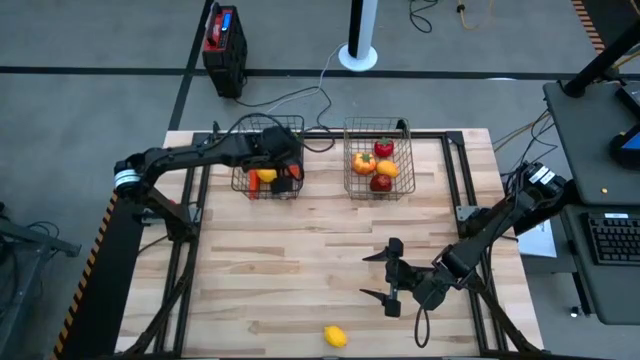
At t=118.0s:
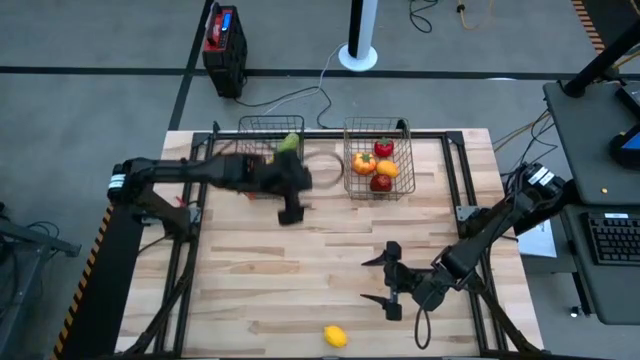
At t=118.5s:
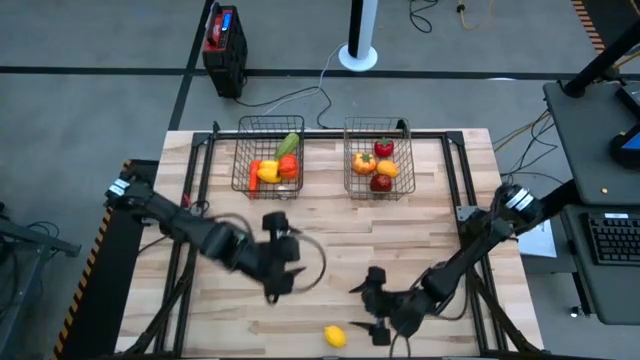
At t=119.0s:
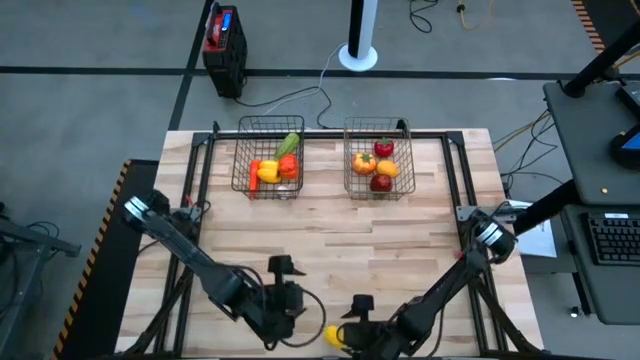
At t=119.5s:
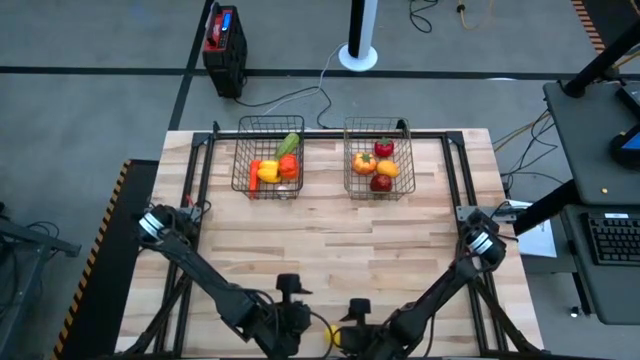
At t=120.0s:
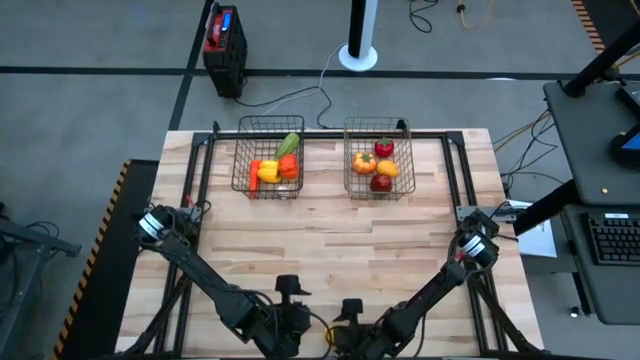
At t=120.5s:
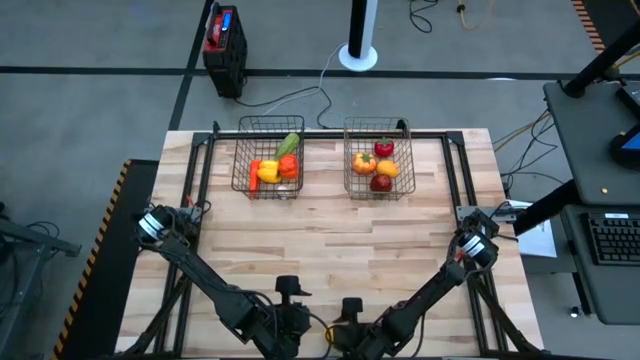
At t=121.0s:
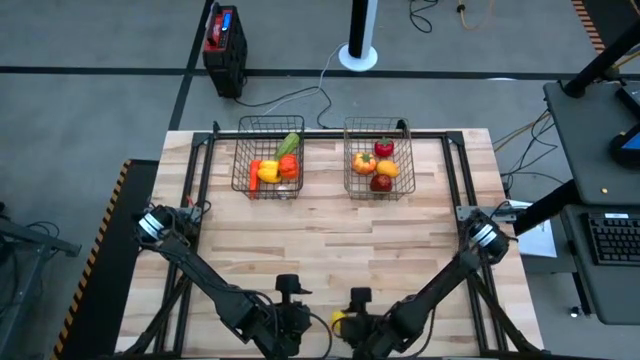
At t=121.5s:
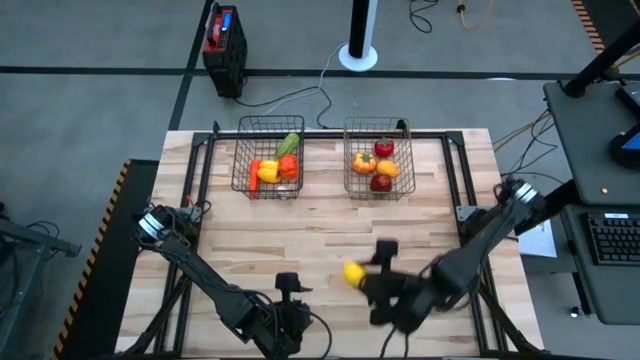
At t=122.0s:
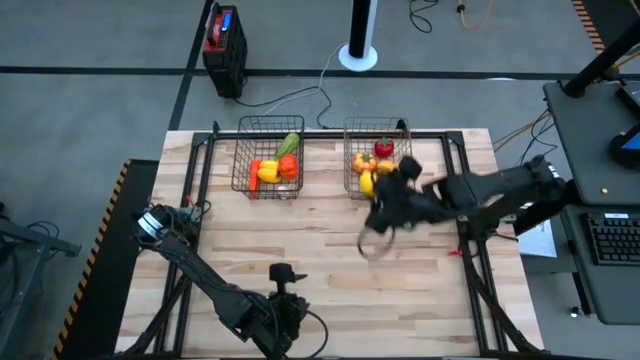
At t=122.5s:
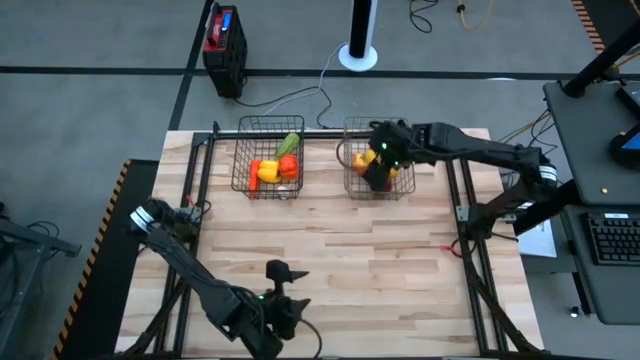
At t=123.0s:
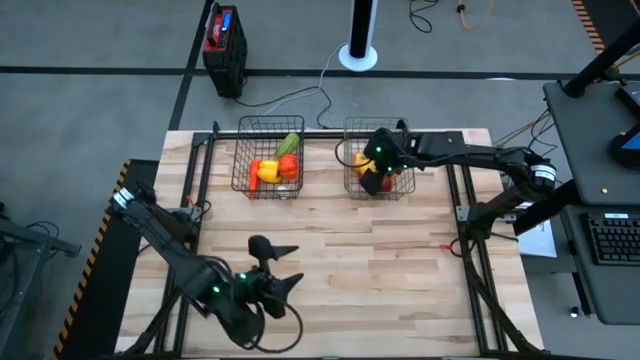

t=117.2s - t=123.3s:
Task: Sort produce into baskets
Put the orange lemon into the gold wire basket

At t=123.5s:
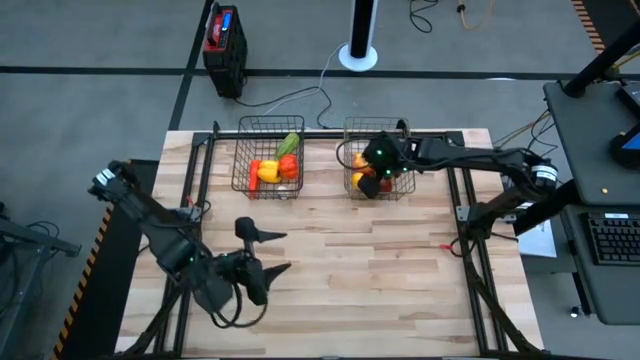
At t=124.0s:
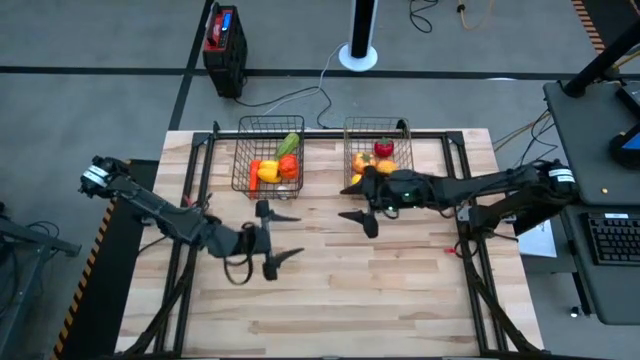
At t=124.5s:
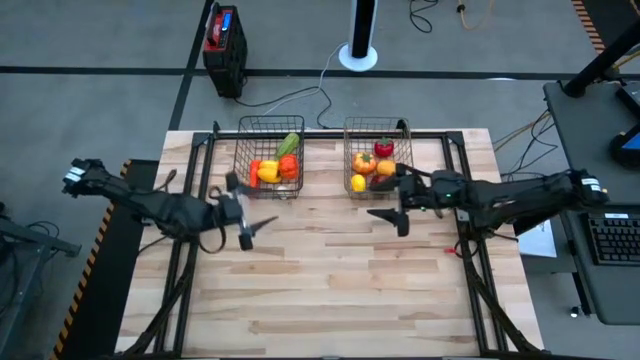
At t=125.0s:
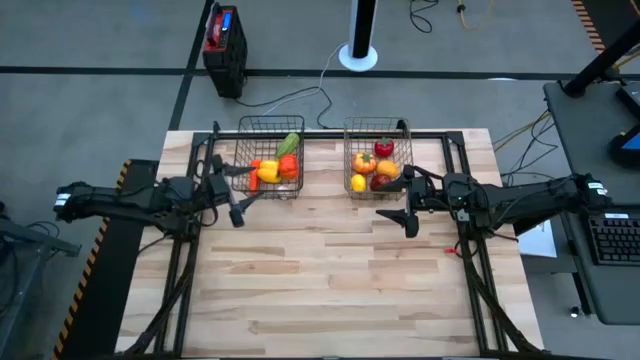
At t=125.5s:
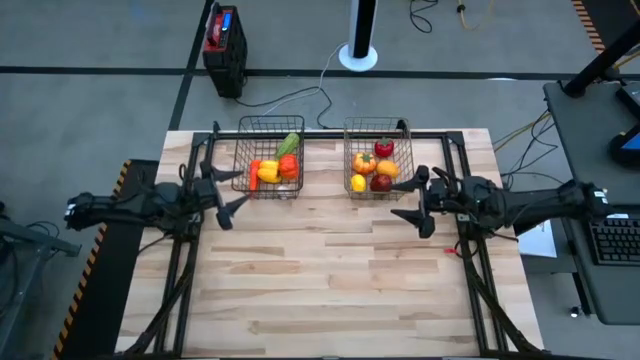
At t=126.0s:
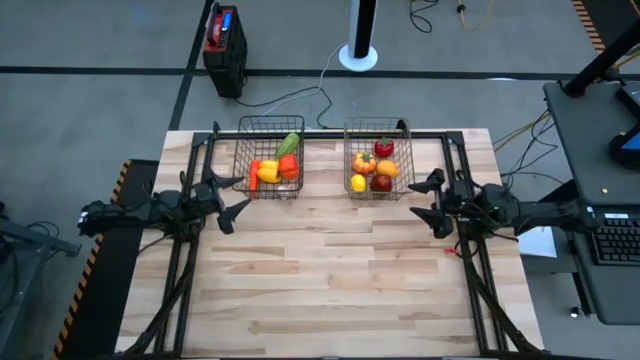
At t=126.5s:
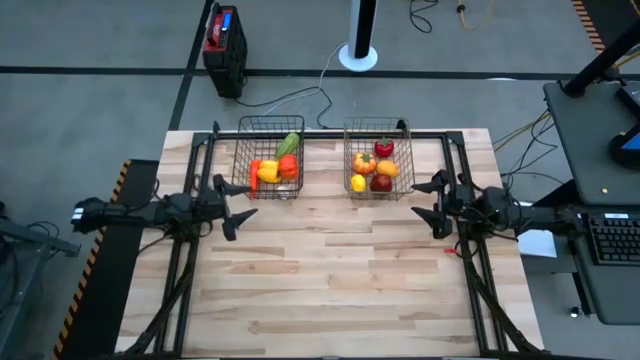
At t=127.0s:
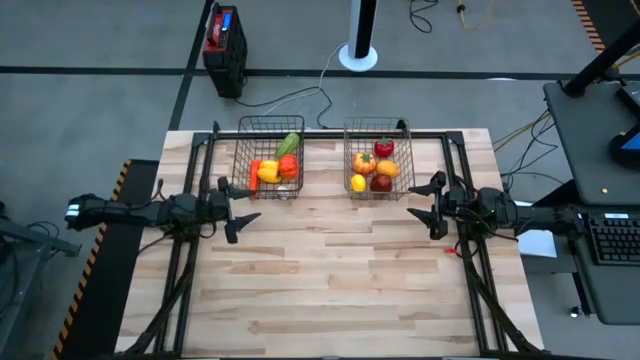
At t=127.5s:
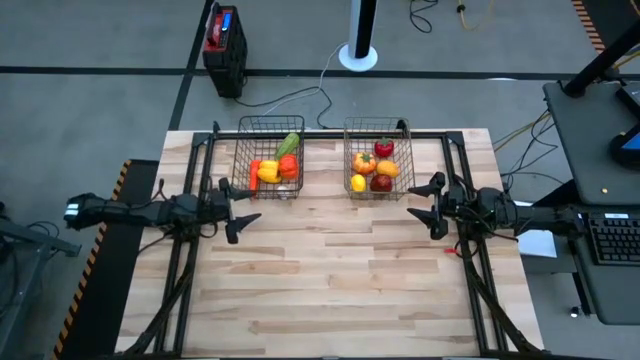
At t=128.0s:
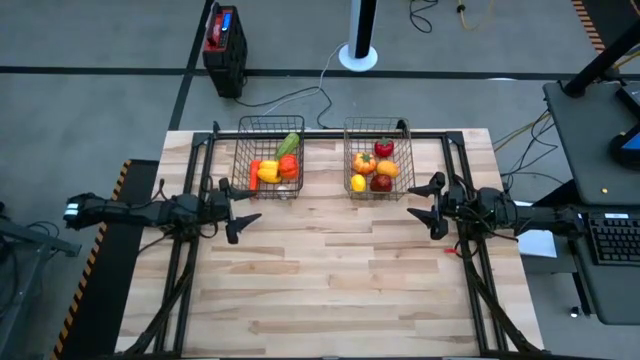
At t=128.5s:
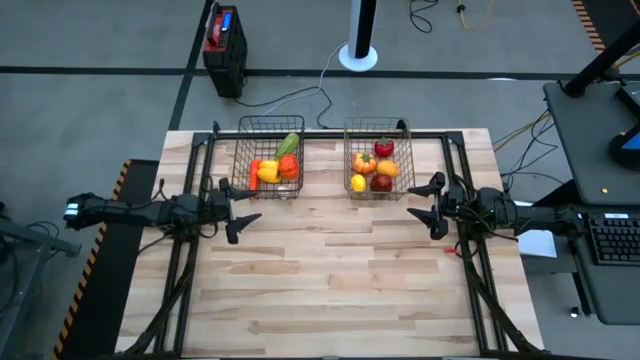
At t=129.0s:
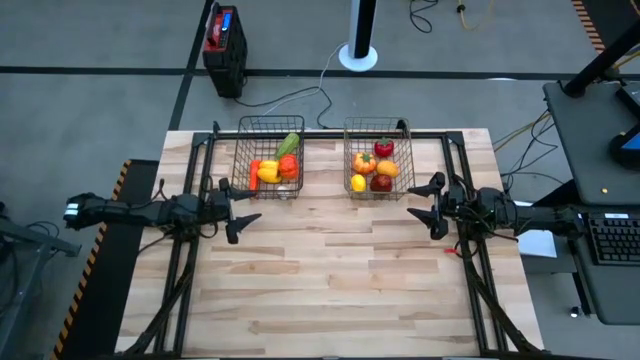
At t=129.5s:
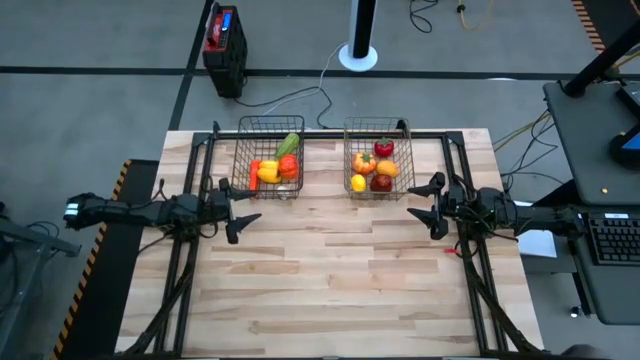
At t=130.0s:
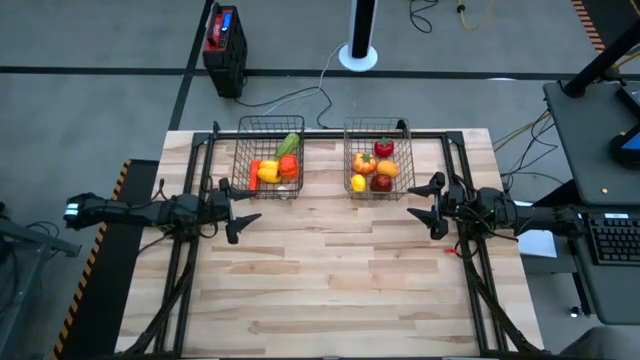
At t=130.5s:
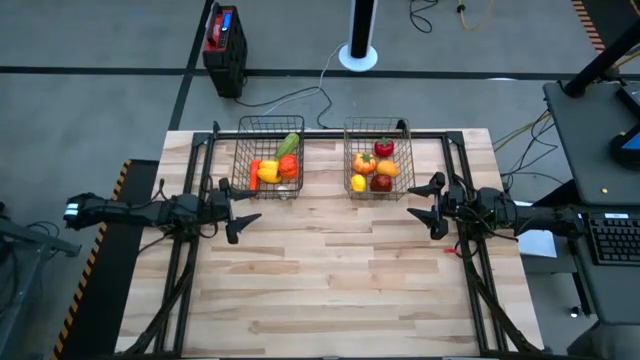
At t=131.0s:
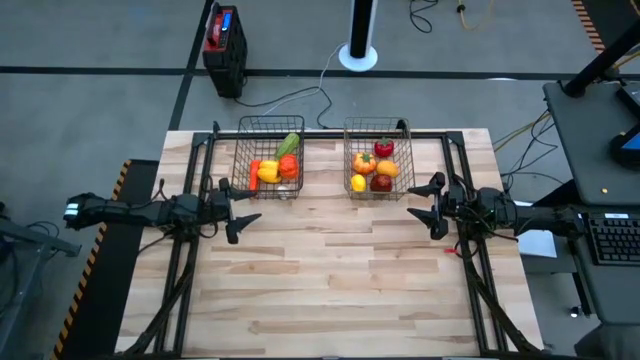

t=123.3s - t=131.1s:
Return to Home Position

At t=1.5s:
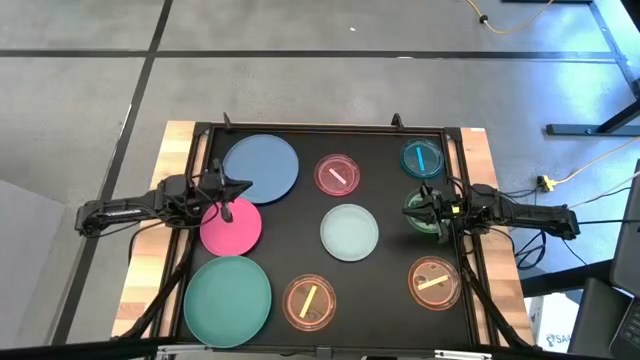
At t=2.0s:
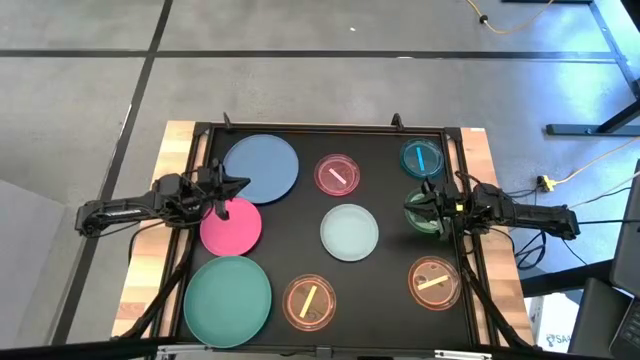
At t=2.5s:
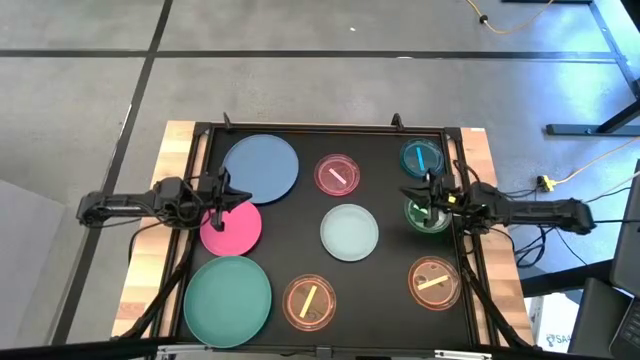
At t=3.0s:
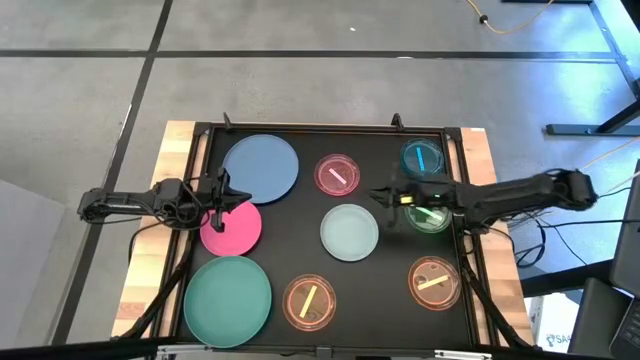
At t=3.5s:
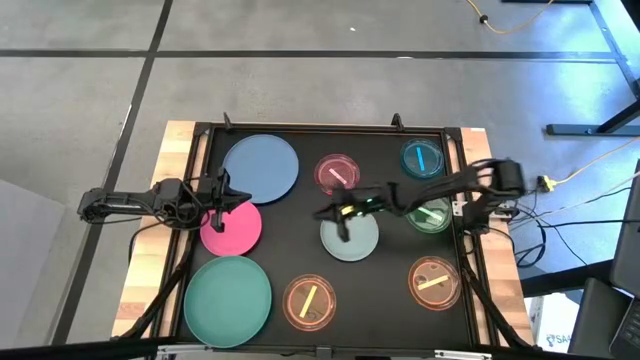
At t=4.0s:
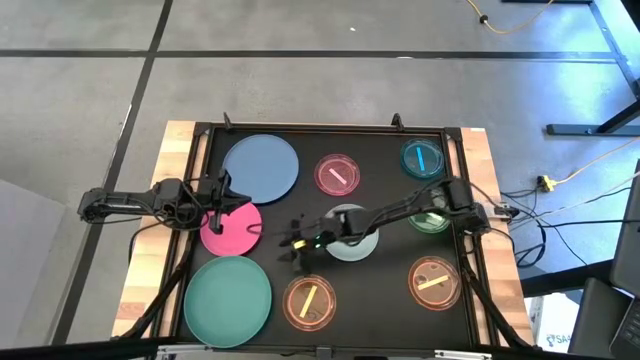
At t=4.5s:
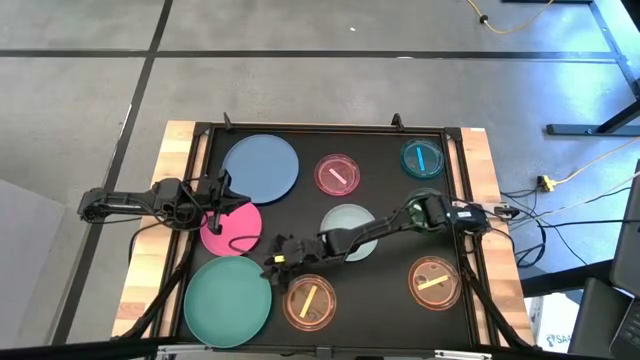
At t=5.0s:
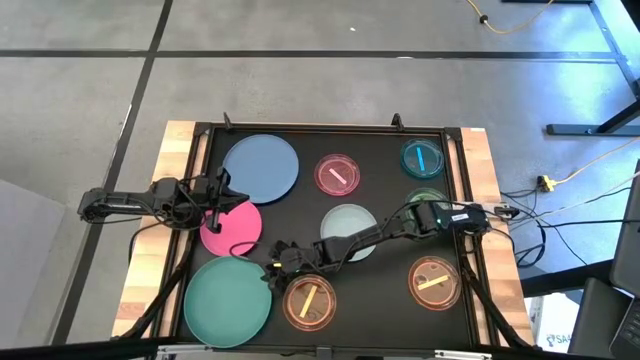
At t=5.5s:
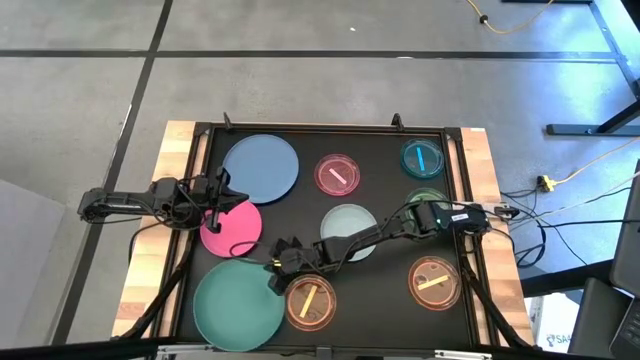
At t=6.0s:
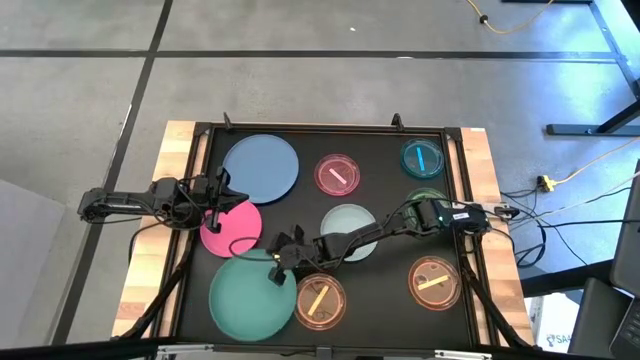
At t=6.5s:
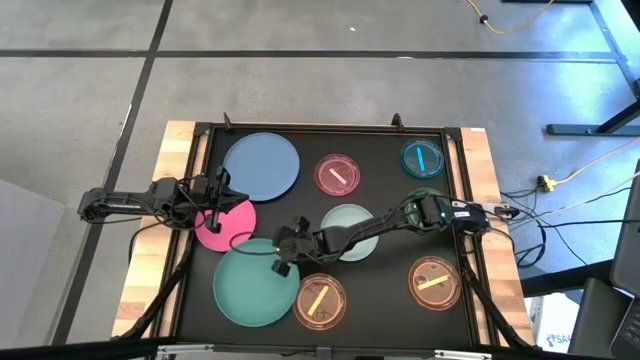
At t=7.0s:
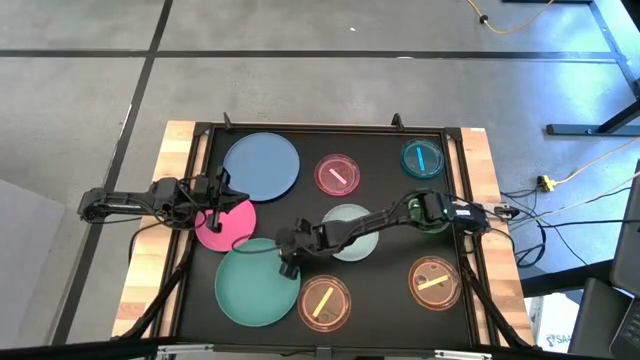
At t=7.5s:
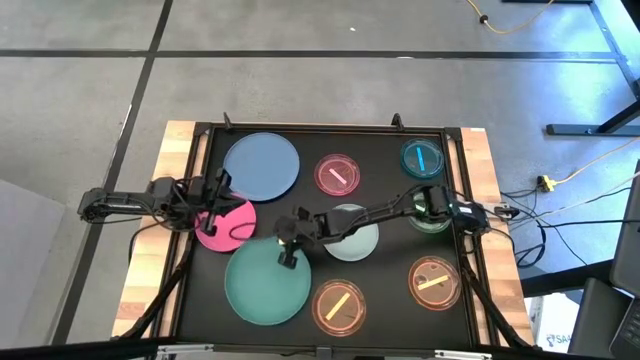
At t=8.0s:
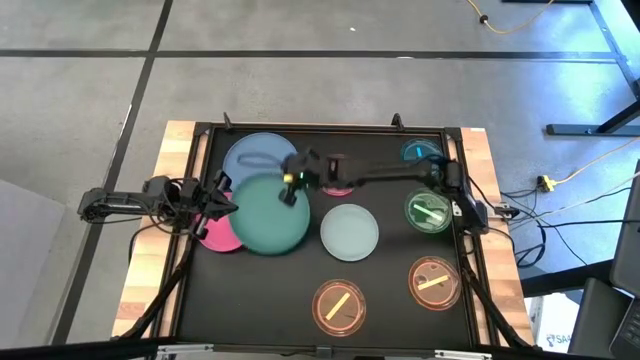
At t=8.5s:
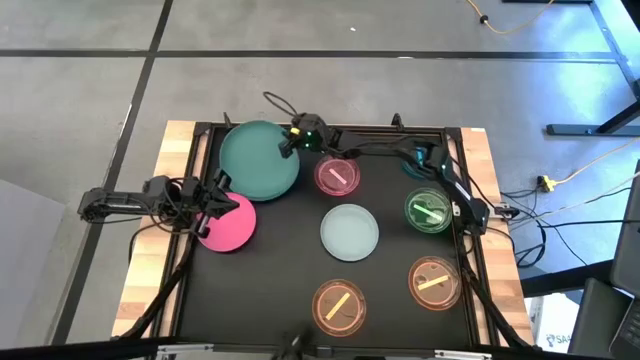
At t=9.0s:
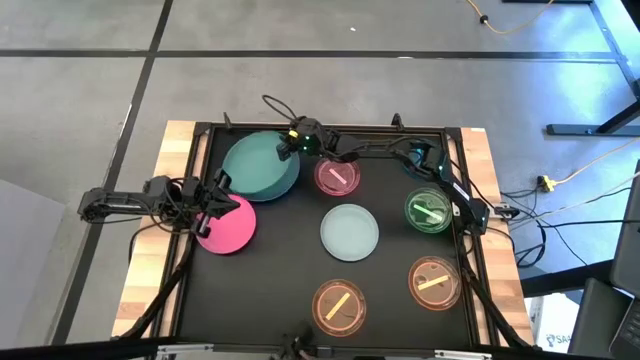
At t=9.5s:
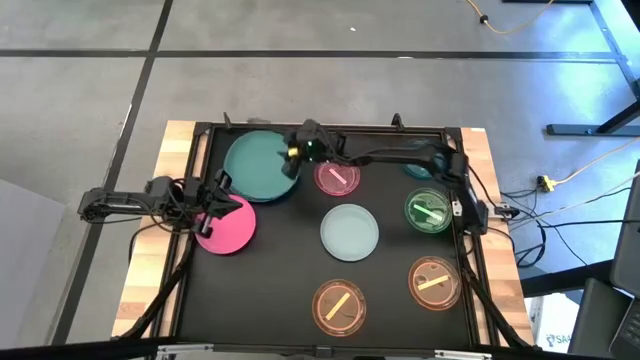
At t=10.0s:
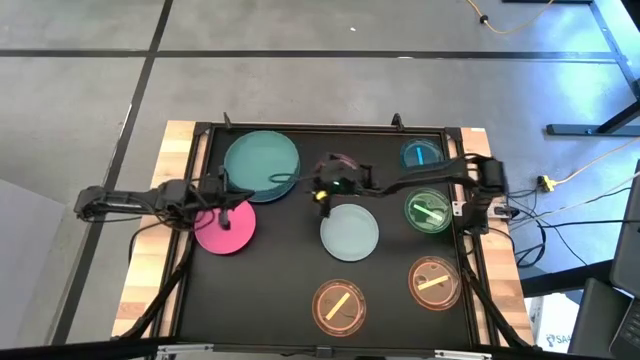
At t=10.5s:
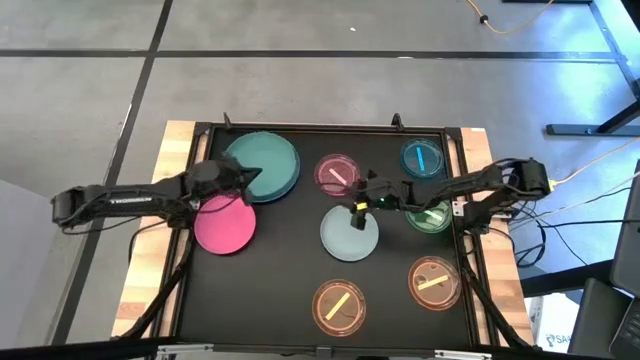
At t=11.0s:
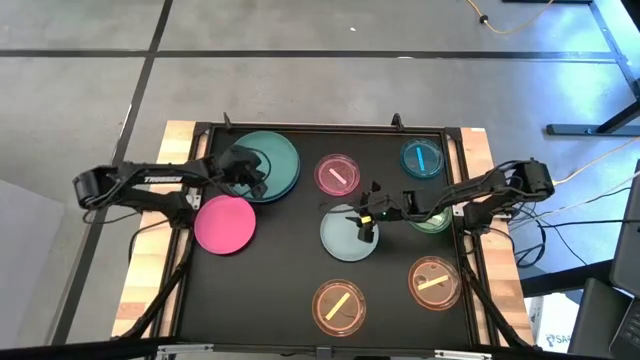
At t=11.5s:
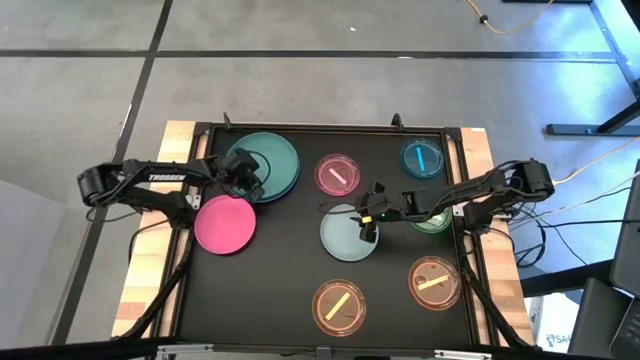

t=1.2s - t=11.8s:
Task: Stack plastic plates
Stack the green plate on top of the blue plate
